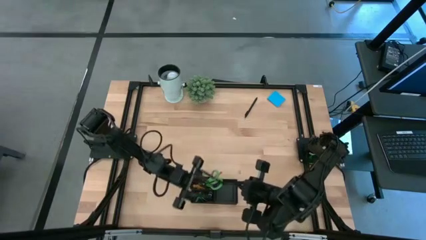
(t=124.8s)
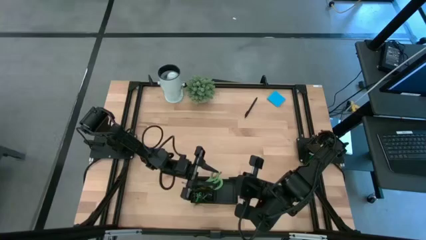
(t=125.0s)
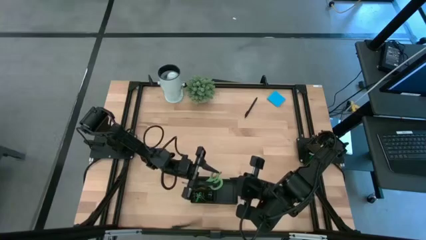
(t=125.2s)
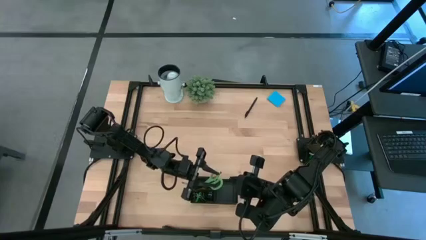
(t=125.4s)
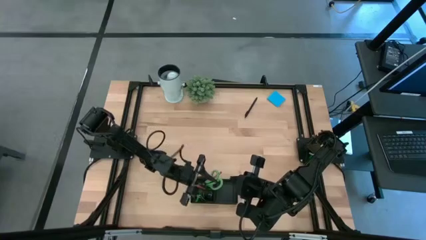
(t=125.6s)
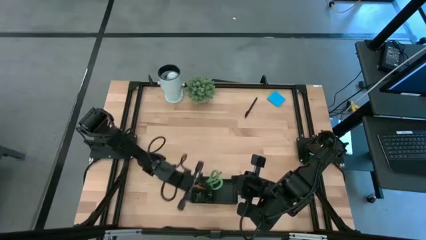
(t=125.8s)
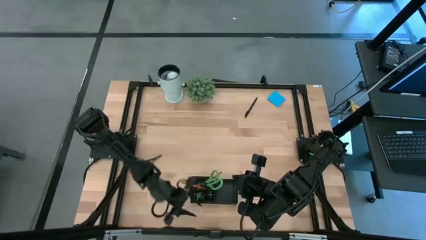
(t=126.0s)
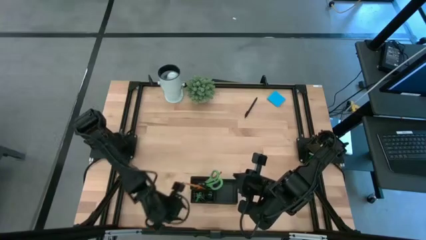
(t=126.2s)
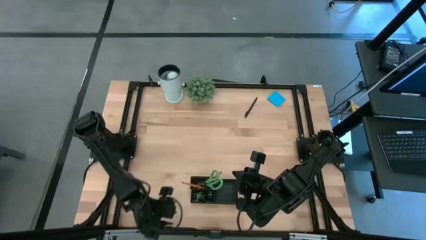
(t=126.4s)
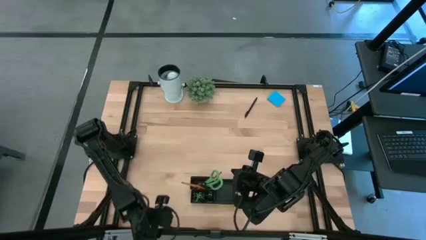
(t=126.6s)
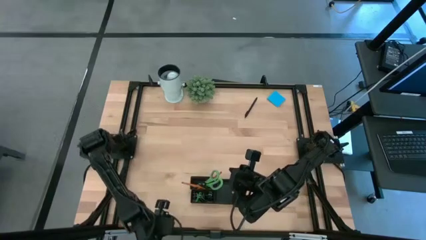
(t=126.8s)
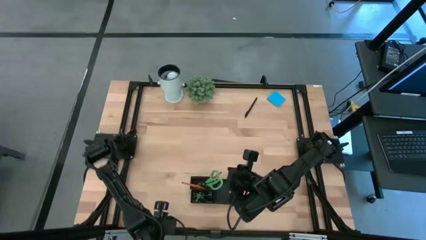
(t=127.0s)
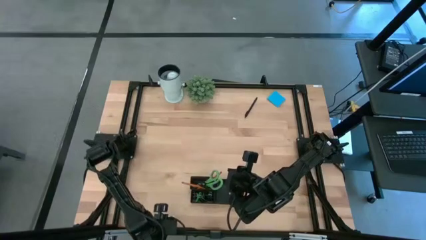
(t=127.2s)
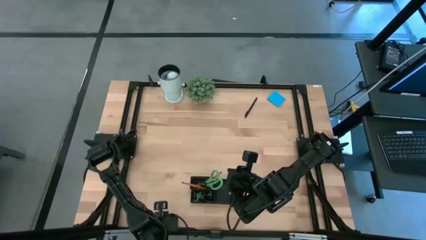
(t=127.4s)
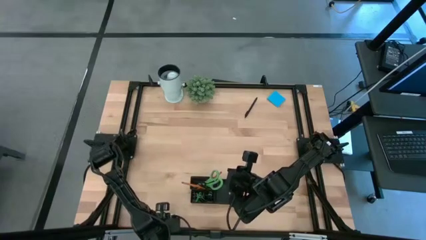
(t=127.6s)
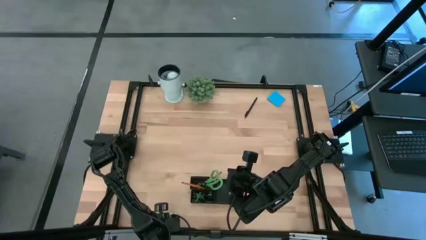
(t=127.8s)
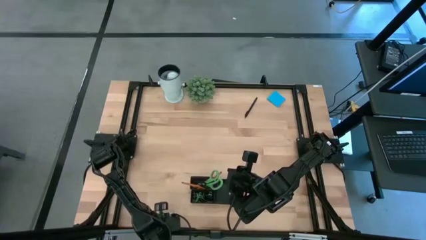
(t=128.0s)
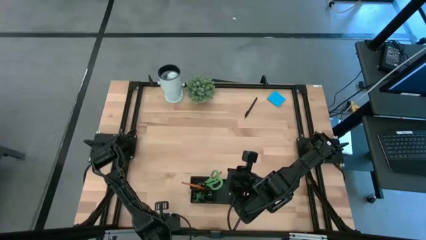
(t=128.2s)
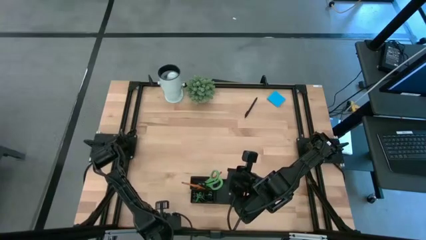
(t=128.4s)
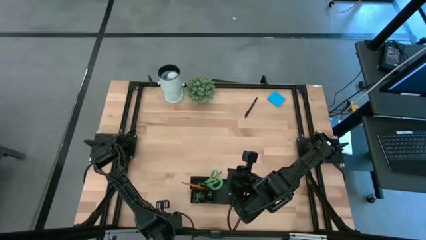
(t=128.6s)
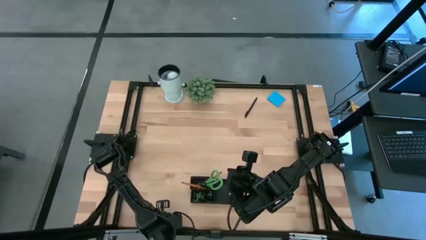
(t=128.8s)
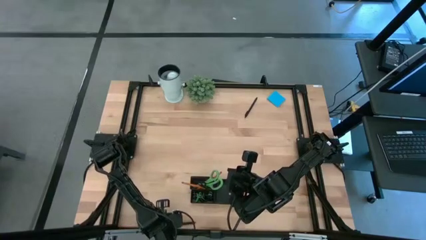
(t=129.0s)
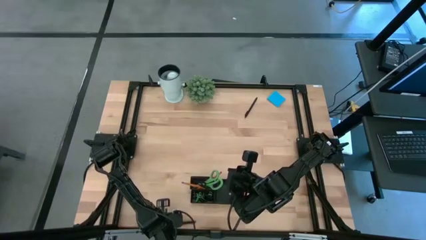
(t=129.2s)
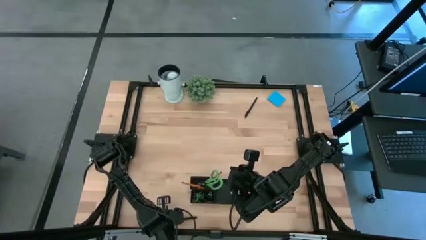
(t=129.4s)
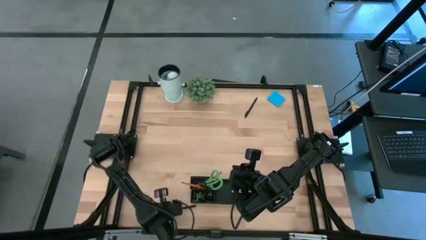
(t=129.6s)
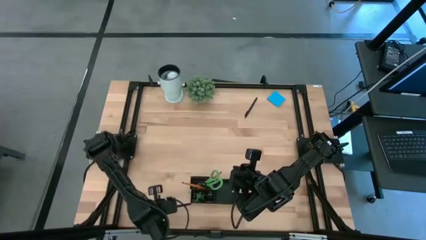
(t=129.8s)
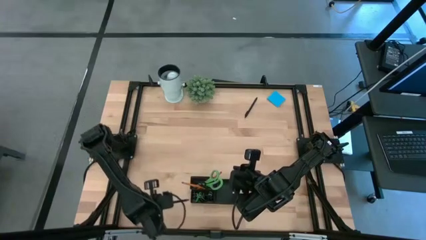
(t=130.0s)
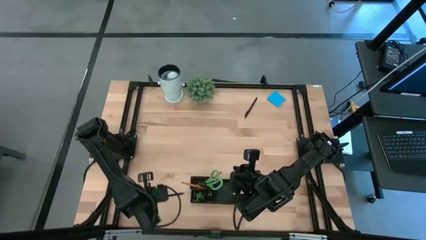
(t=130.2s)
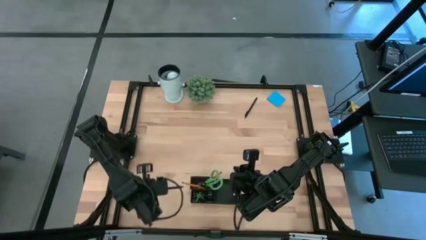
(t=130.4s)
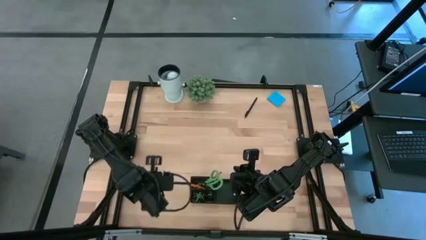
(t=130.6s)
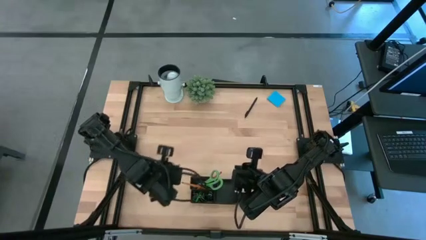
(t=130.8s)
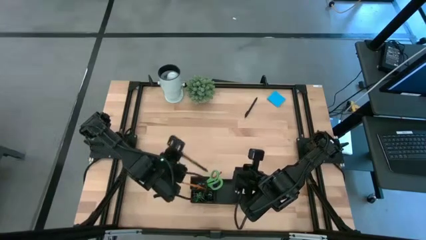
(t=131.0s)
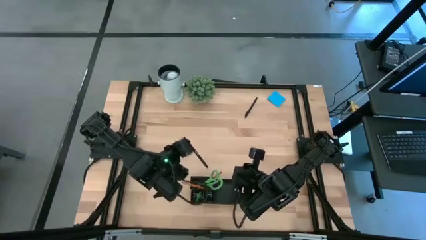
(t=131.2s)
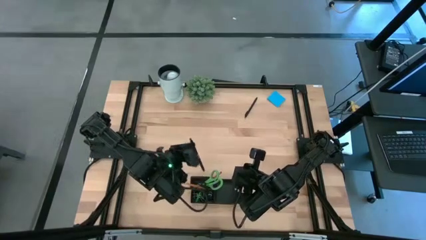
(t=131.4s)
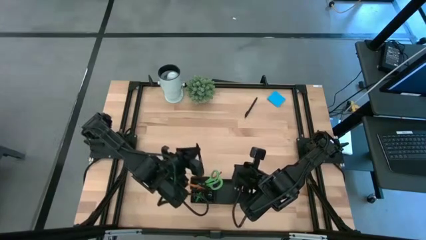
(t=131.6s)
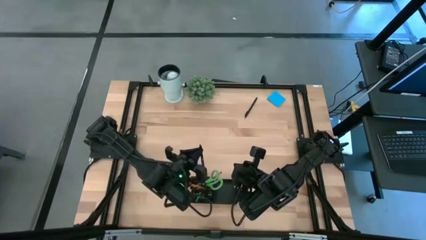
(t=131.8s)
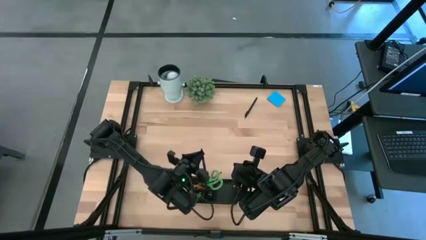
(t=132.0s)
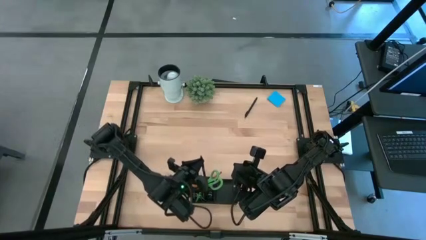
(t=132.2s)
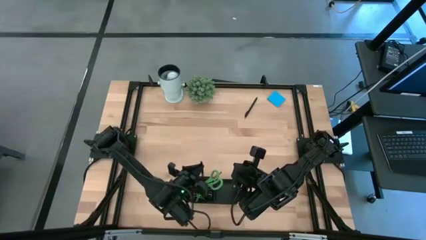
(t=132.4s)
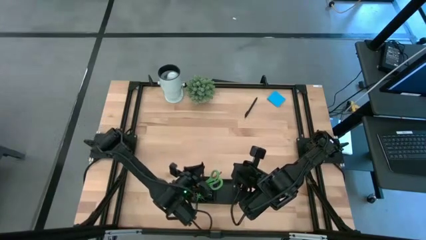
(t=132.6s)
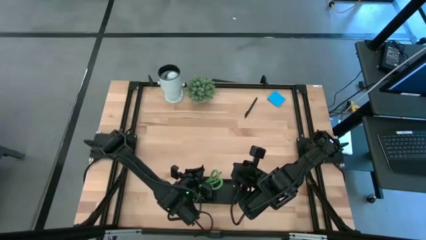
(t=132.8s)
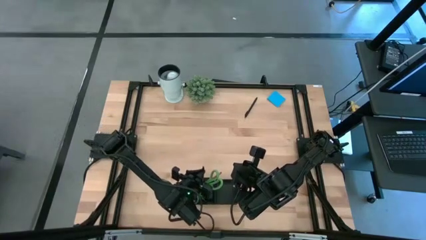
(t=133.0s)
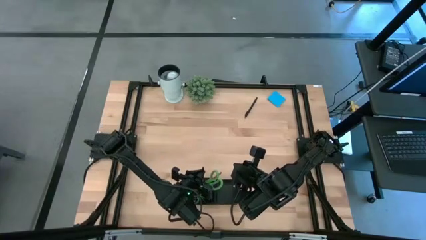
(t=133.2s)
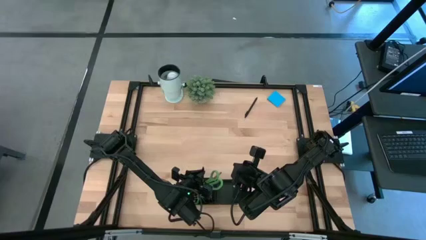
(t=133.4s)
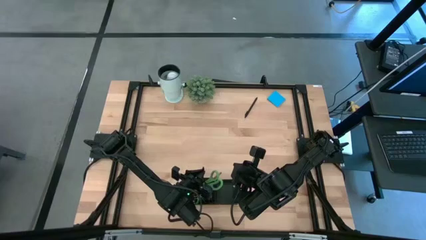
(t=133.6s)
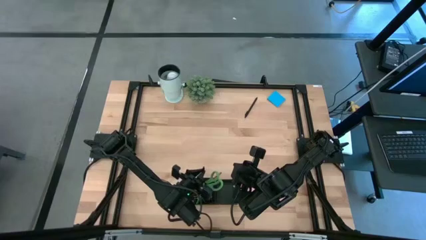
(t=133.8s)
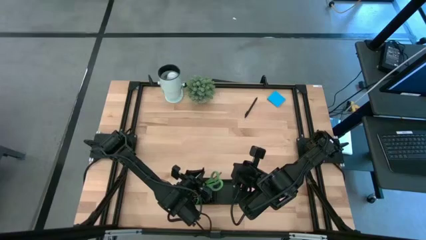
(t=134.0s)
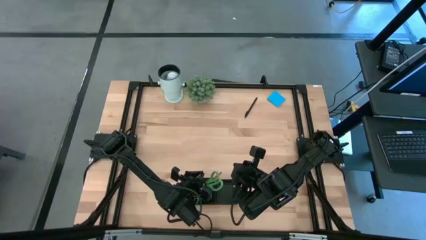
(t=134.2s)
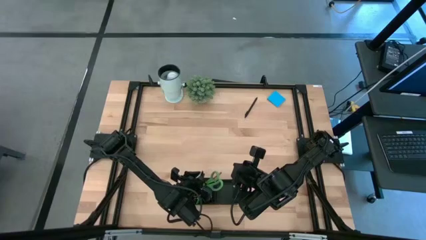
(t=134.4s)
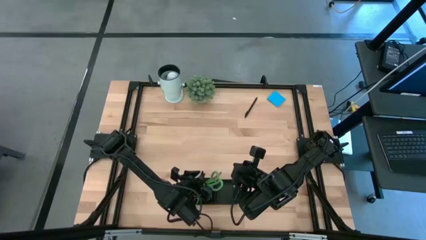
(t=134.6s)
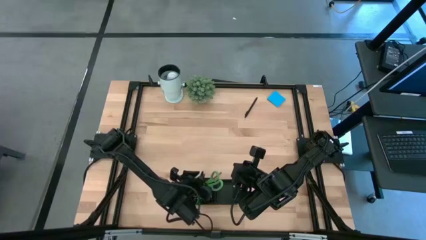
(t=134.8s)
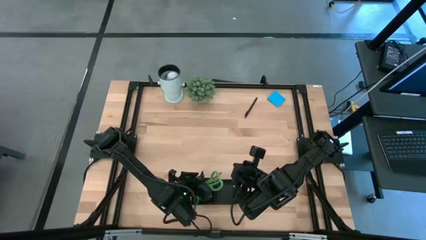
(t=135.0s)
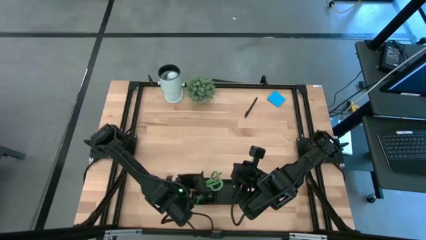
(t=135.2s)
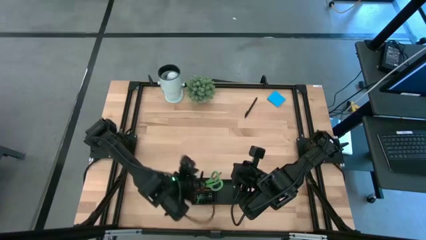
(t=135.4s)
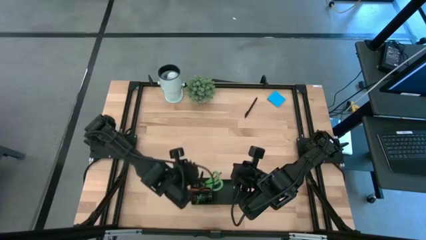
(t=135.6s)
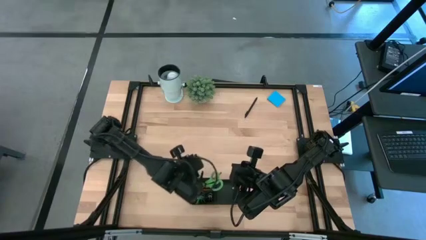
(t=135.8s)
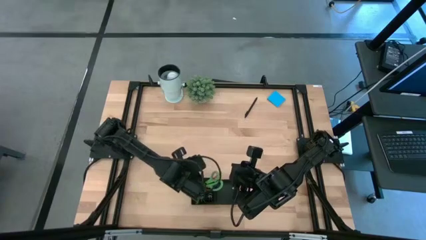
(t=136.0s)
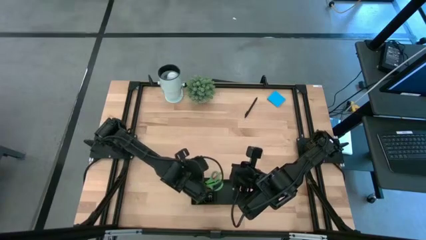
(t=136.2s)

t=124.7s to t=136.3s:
Task: Pick and place office supplies into organizer
Put the bottom black pen into the black desk organizer
